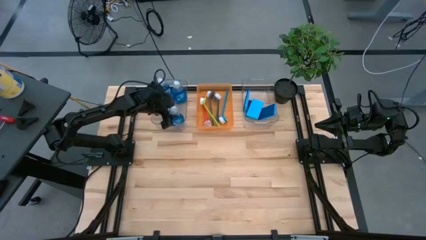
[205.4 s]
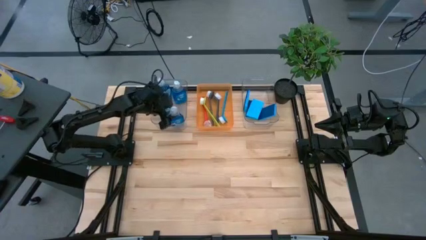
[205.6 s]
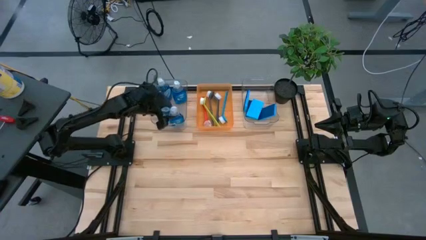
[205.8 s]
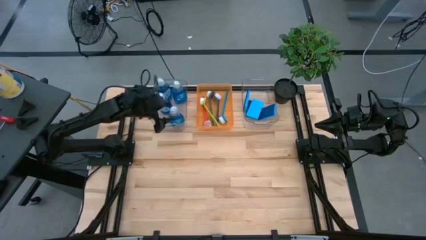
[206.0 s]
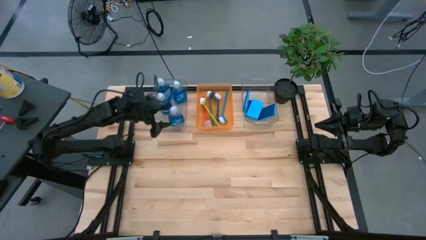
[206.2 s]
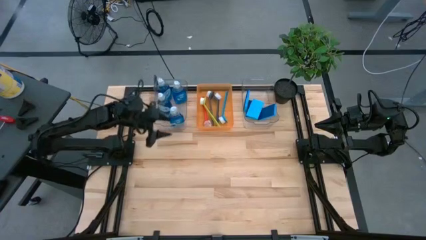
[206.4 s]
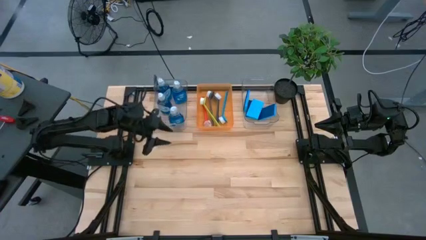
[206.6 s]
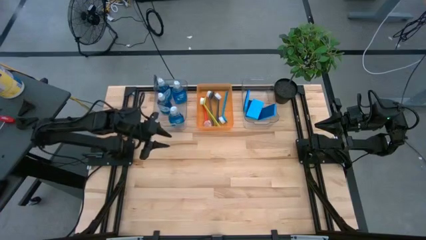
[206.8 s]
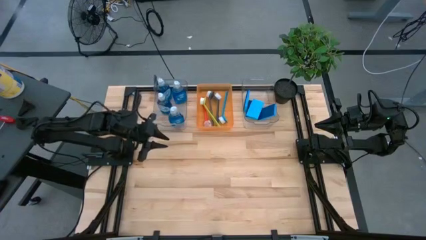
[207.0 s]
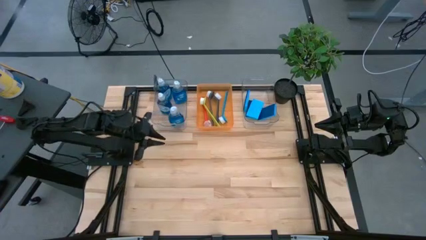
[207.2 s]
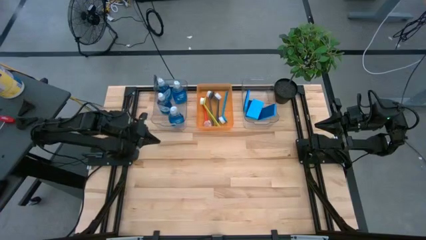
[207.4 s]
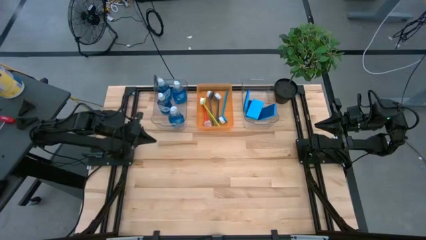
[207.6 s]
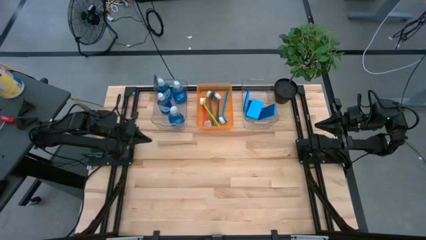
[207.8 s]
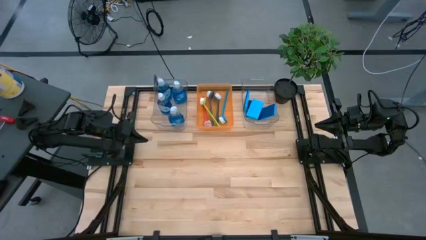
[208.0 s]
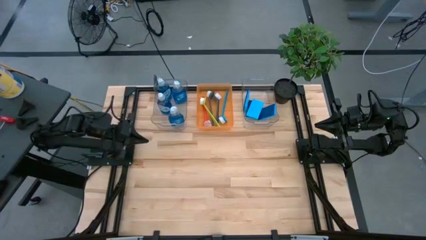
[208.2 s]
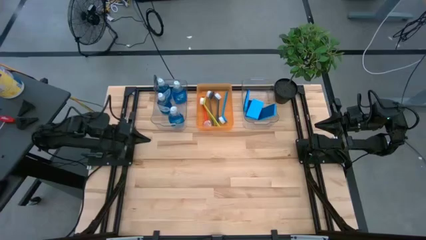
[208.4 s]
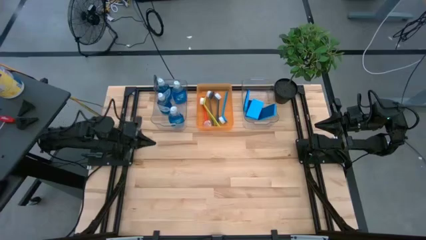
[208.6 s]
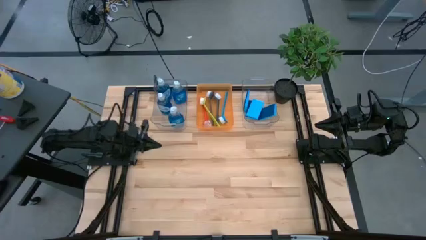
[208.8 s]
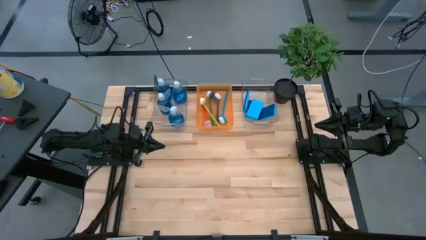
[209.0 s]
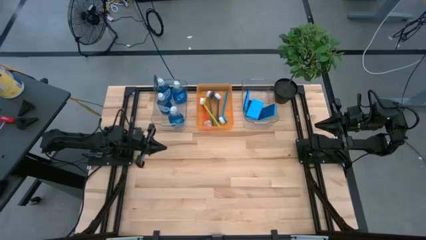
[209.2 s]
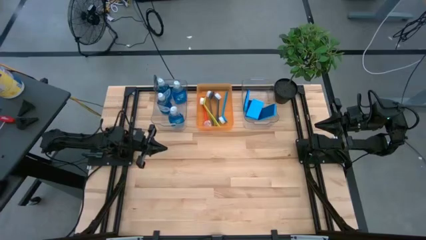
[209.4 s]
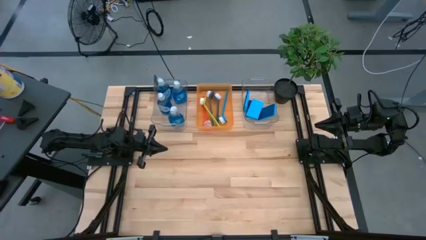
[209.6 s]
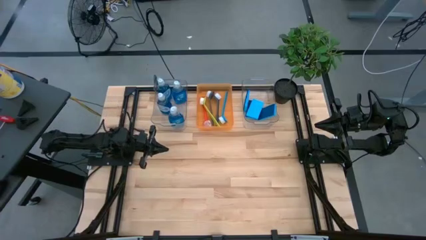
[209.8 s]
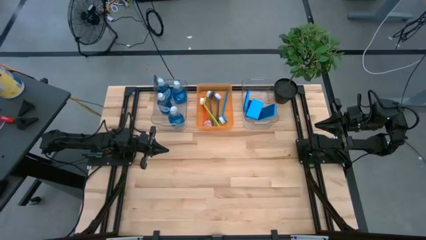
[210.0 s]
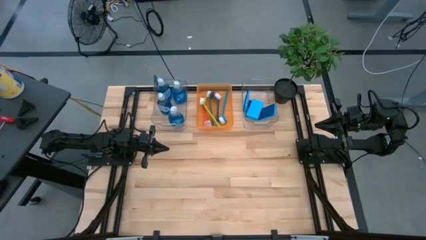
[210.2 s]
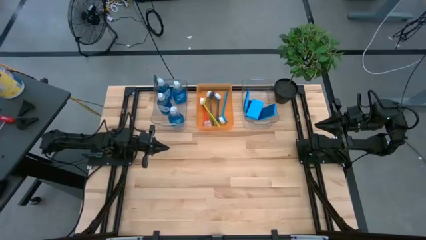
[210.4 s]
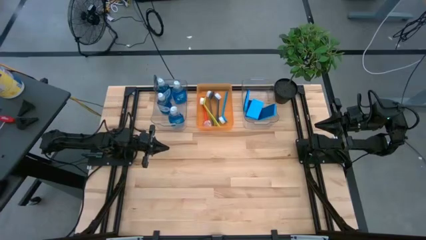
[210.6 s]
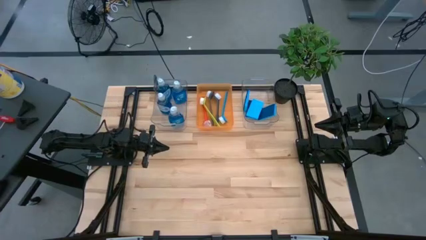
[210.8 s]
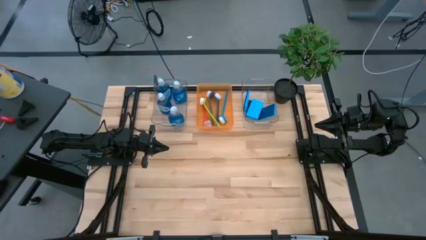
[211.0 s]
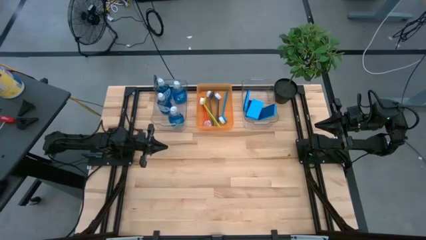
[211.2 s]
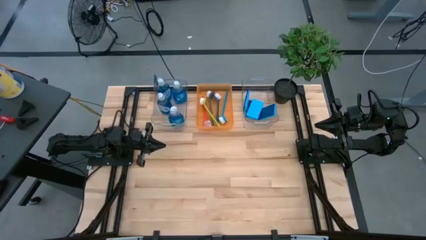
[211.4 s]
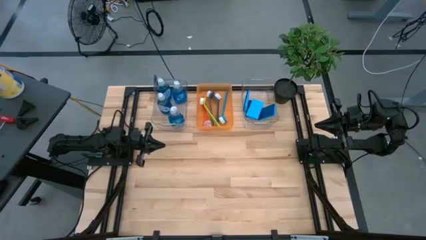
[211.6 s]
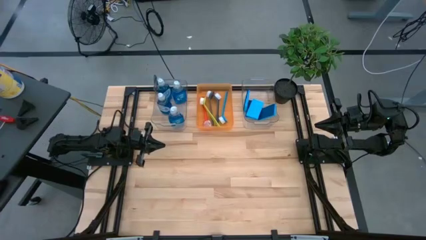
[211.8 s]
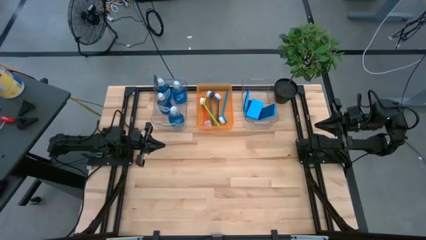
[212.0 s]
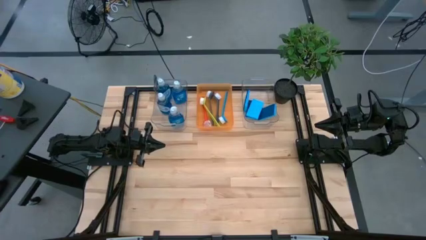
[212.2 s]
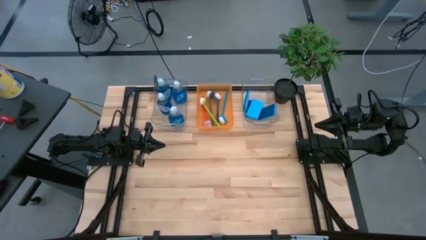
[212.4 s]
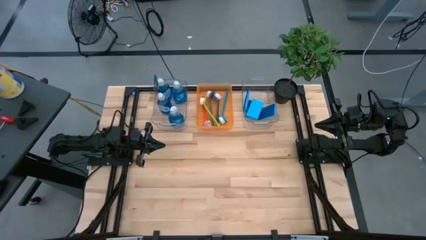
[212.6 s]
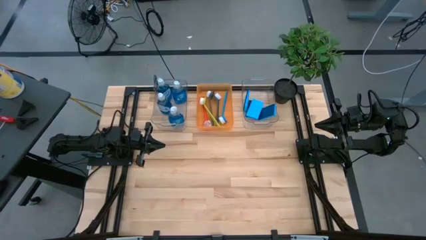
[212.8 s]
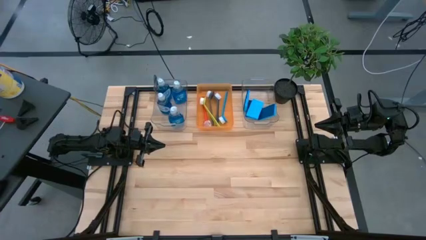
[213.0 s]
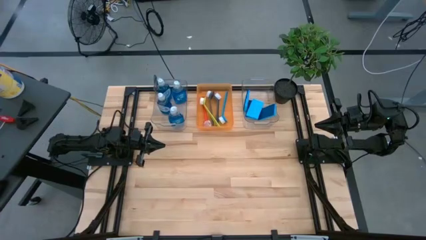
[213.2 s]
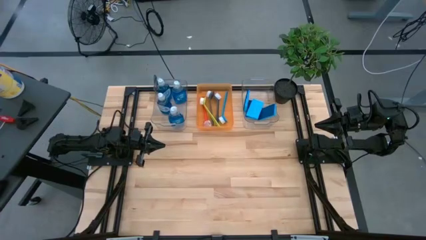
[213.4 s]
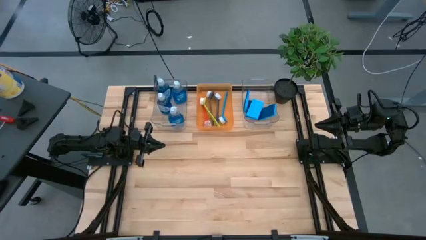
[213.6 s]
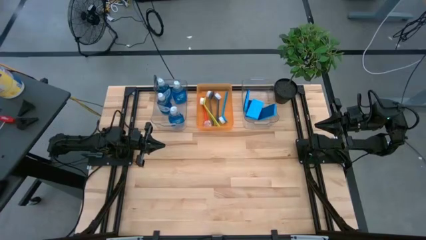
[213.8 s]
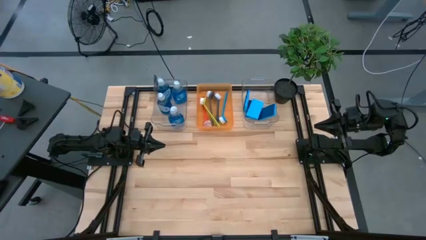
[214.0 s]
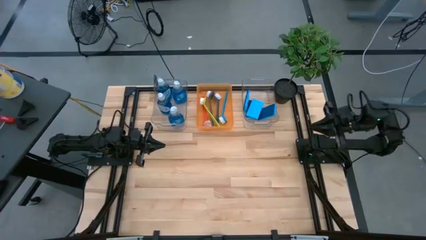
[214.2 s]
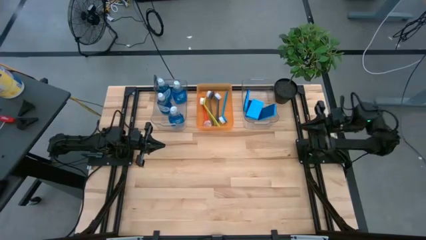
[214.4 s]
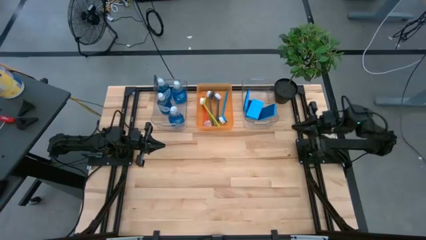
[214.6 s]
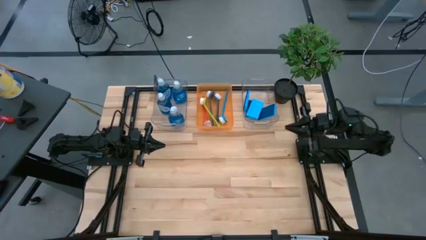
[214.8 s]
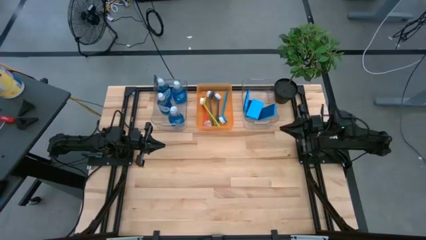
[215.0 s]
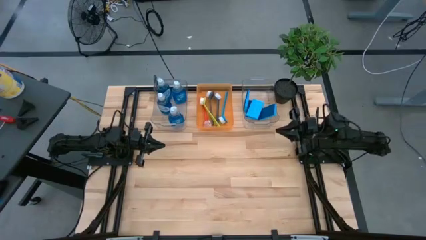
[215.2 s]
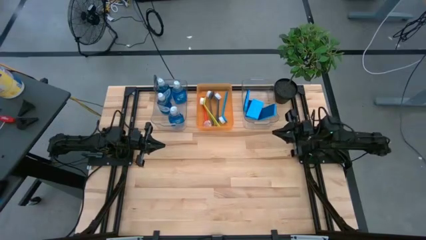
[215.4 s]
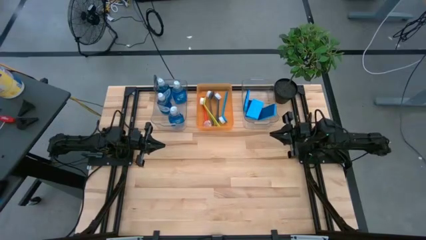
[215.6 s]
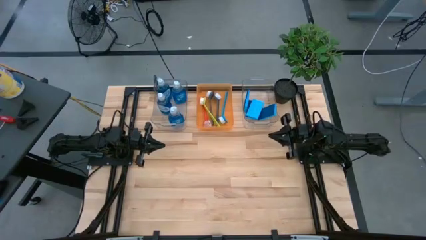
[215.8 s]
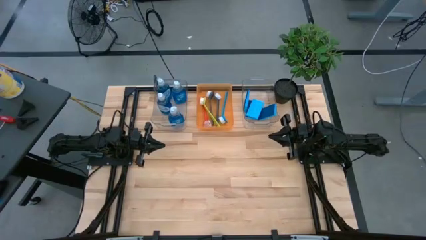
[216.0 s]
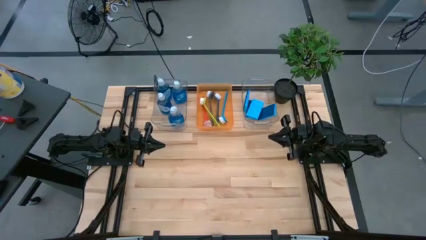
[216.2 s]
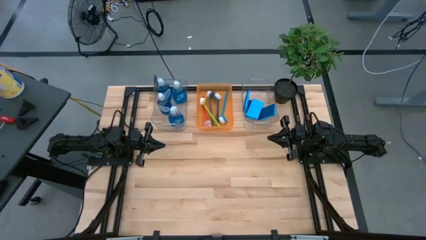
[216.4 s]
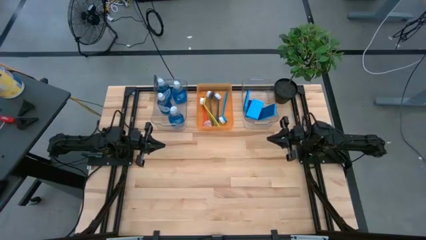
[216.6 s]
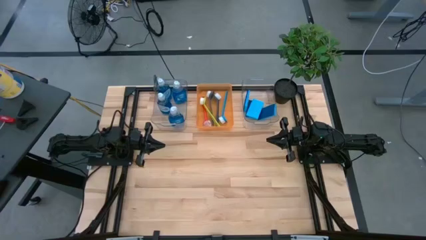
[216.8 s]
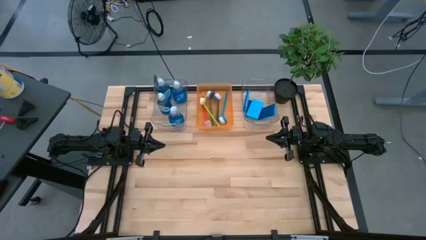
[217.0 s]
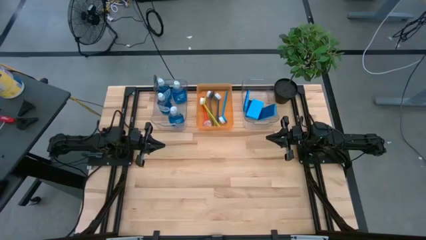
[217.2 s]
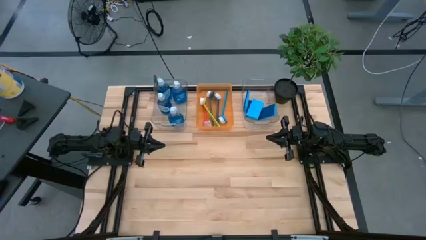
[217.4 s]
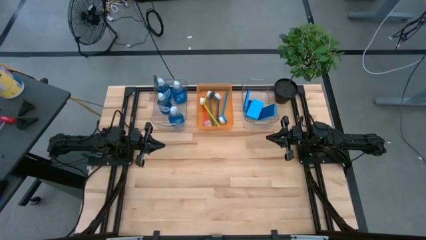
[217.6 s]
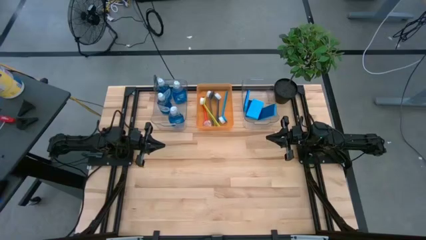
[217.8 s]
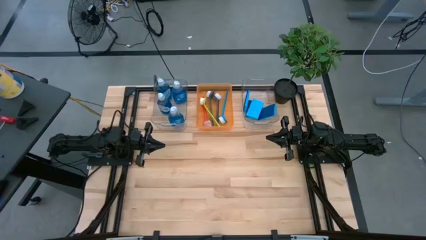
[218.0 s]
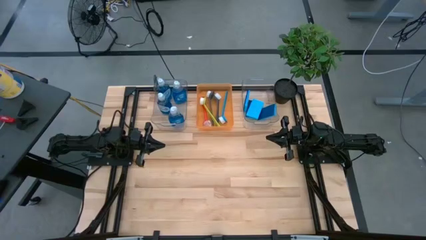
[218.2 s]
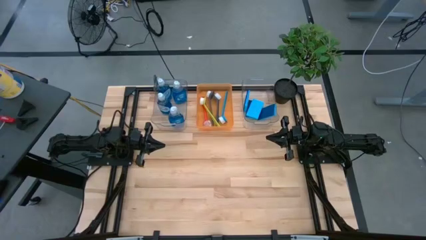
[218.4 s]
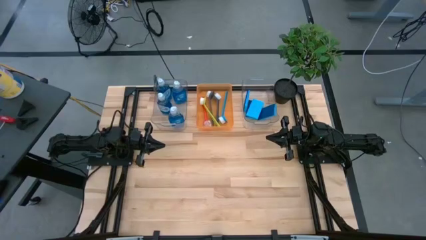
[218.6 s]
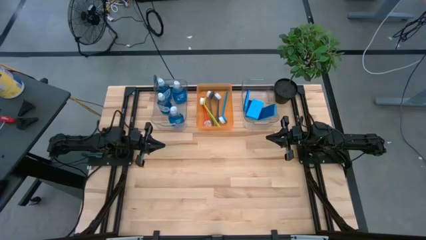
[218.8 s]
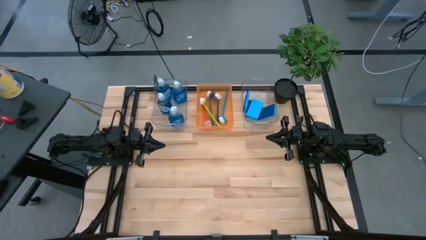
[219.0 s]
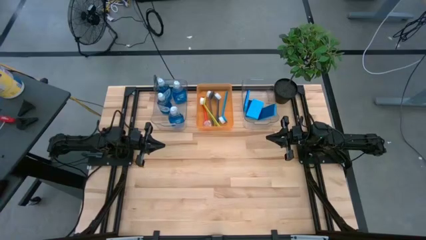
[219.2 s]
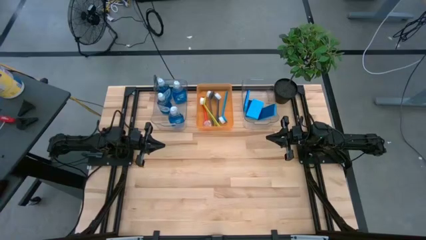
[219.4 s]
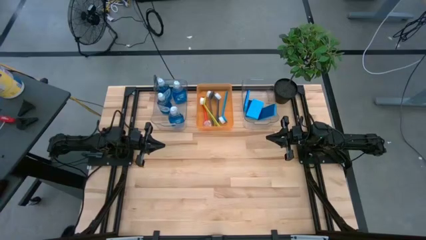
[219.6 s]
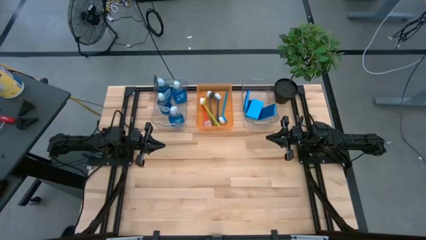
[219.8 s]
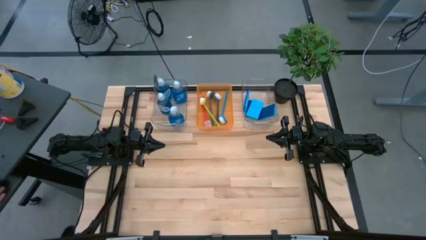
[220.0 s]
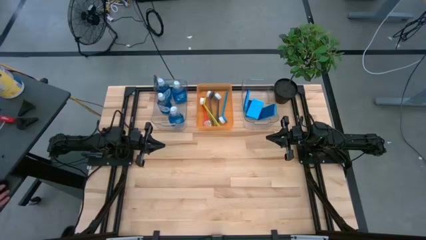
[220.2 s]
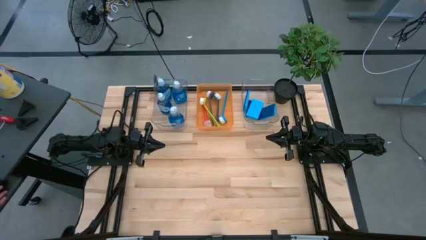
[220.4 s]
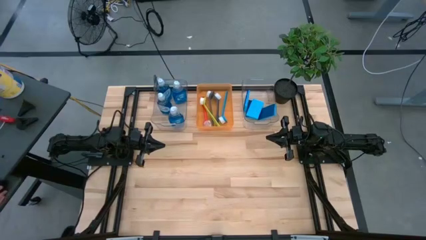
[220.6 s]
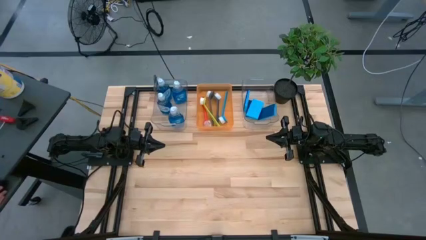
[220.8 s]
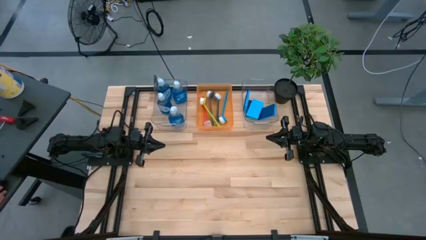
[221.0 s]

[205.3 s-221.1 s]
Task: Pick & Place Kitchen Sink Supplies
Return to Home Position
